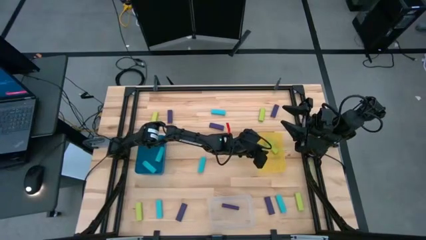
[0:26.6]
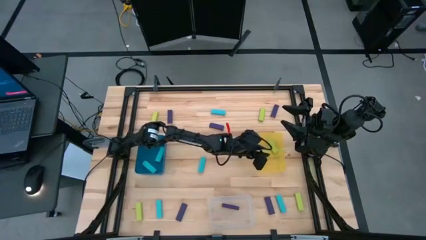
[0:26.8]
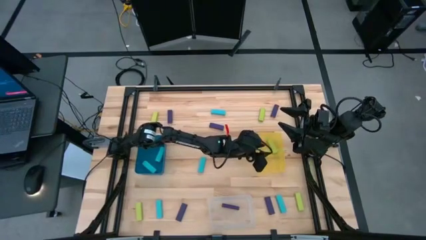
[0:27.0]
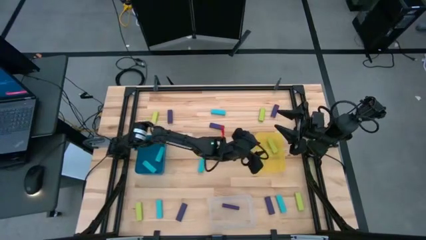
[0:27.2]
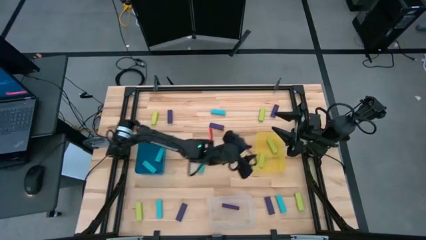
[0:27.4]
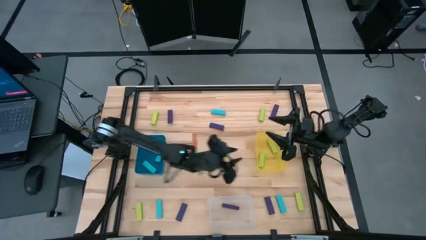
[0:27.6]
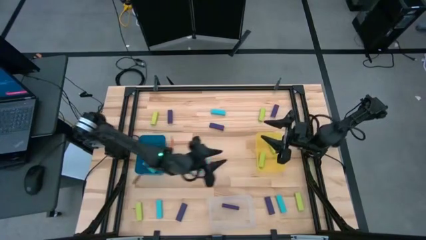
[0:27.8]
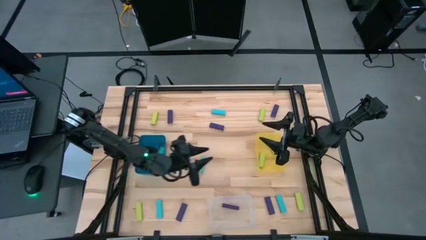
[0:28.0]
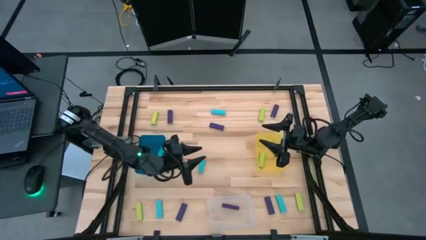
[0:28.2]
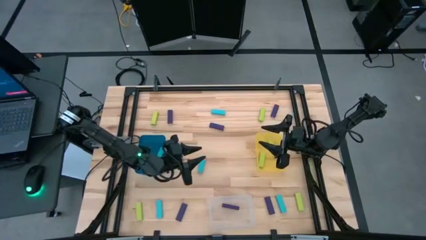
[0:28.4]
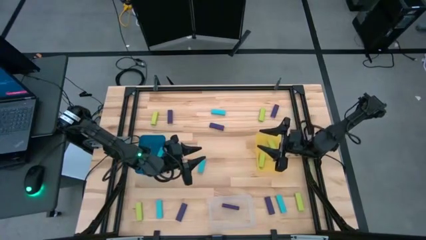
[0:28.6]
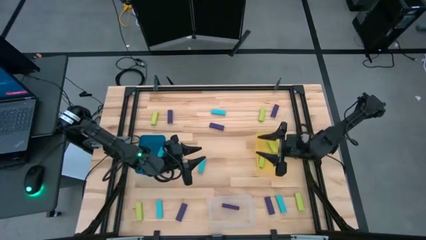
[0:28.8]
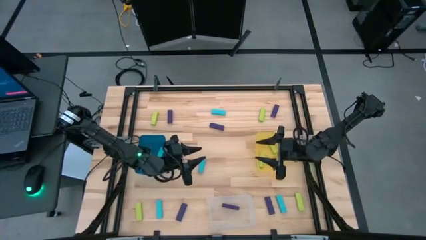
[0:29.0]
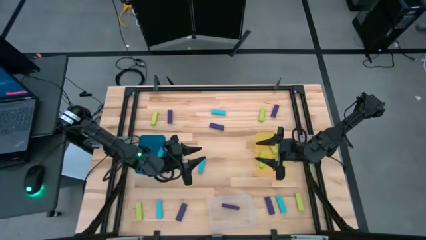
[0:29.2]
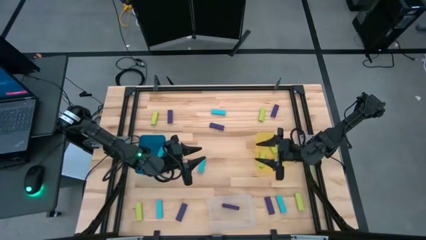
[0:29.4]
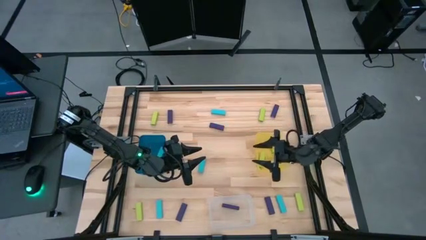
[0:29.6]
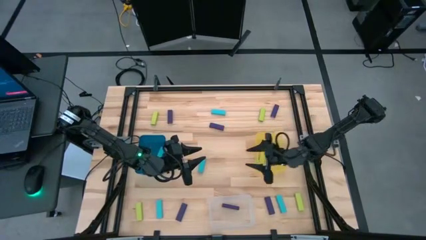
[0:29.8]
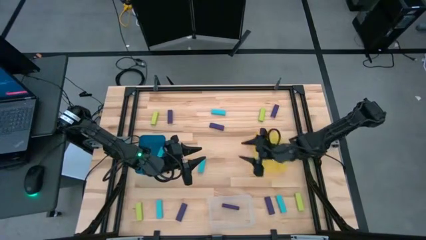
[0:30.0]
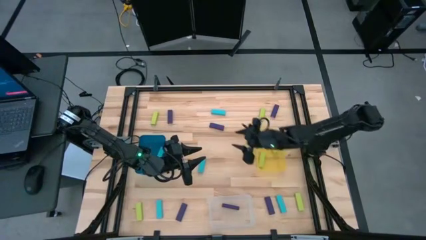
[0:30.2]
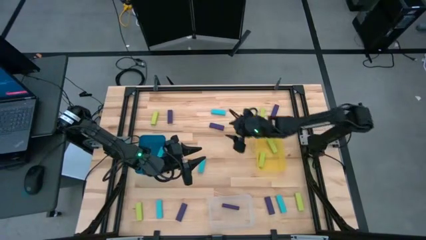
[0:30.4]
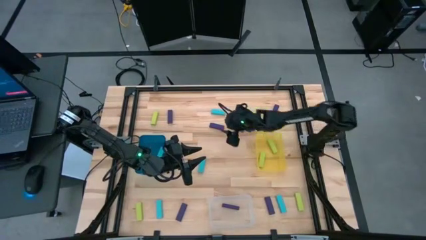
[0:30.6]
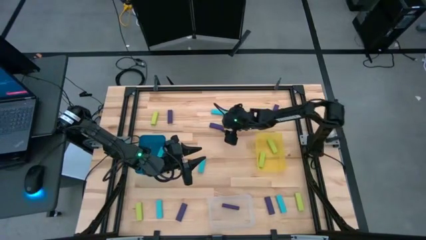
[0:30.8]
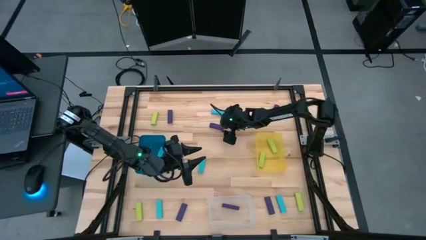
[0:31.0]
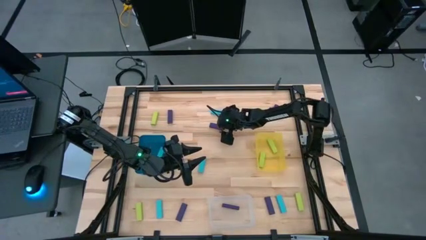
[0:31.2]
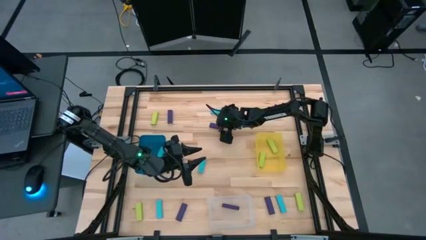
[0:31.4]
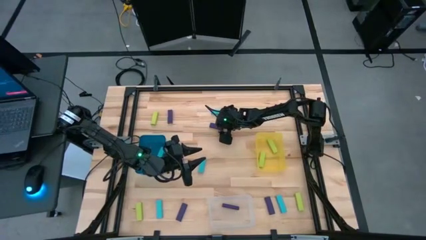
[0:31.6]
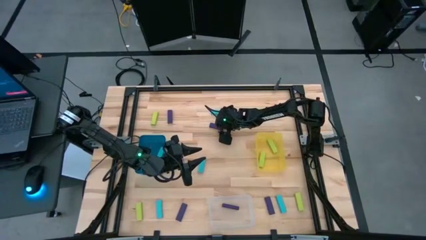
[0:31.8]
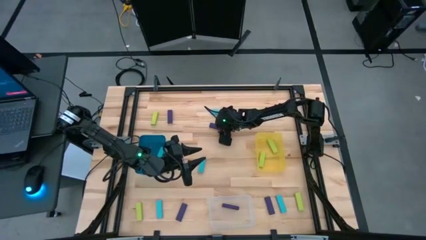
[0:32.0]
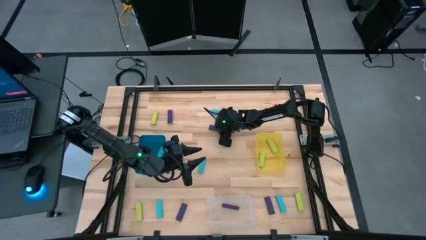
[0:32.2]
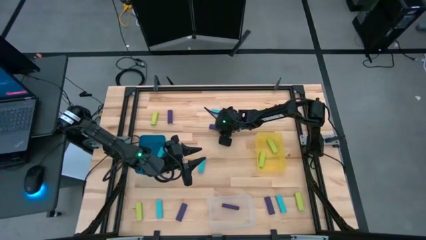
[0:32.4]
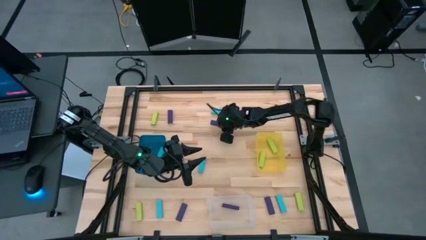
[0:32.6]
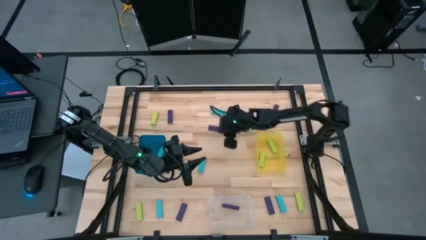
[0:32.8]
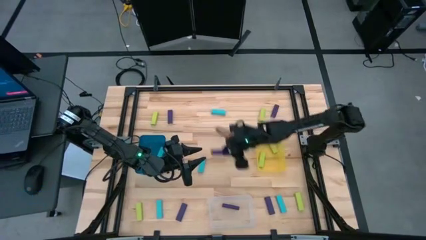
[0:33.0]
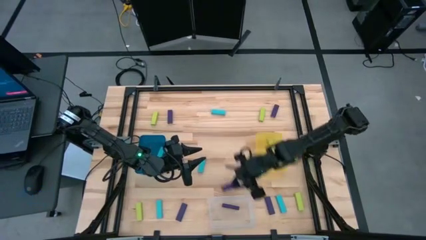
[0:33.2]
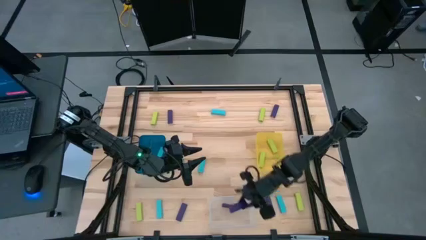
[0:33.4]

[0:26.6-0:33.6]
Task: Sort blocks
Put the violet block into the transparent bin

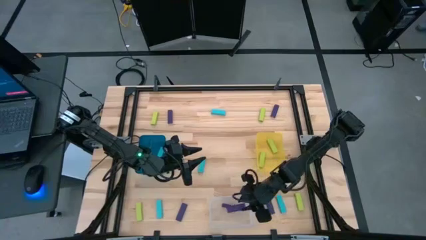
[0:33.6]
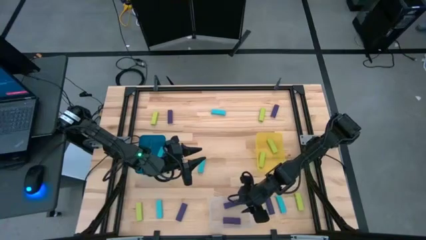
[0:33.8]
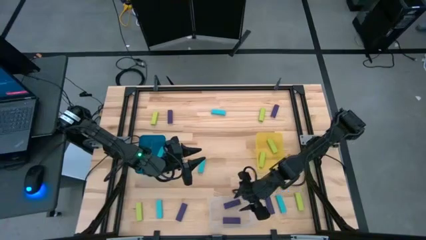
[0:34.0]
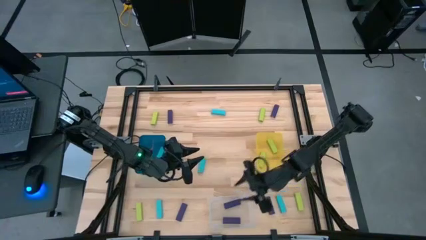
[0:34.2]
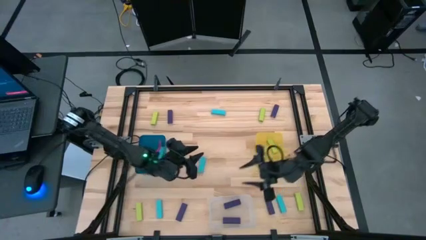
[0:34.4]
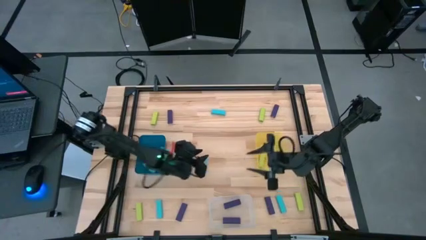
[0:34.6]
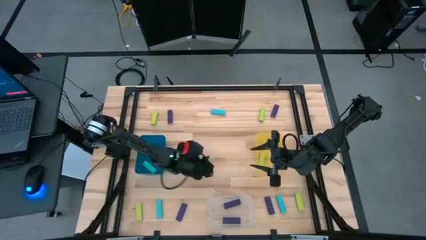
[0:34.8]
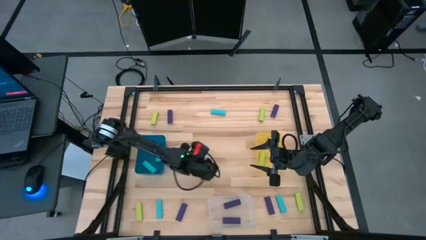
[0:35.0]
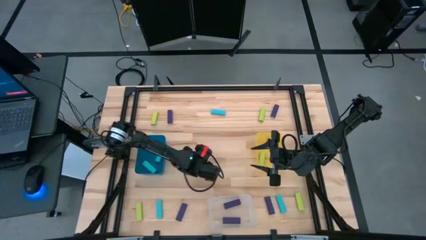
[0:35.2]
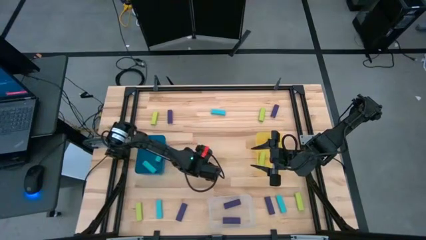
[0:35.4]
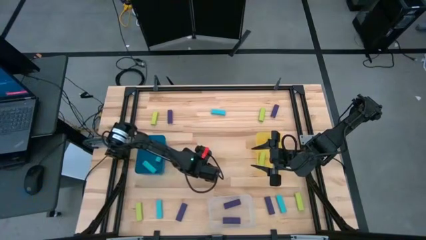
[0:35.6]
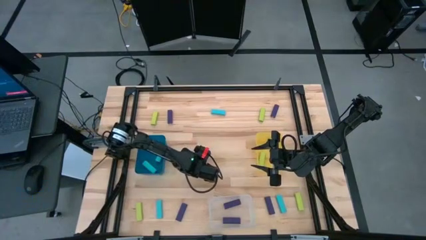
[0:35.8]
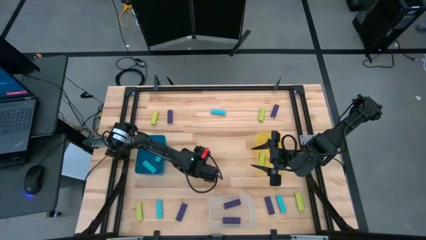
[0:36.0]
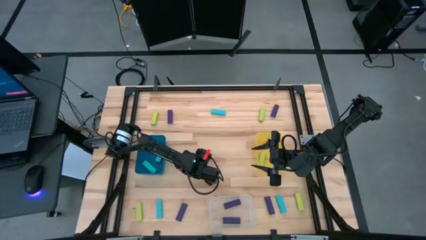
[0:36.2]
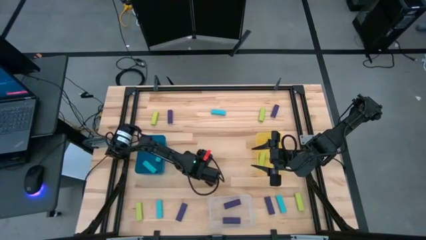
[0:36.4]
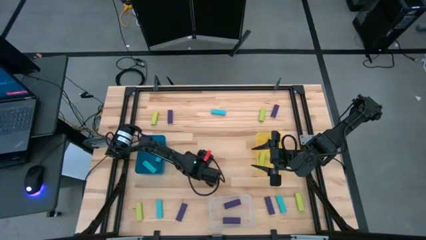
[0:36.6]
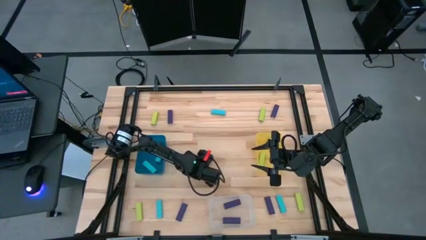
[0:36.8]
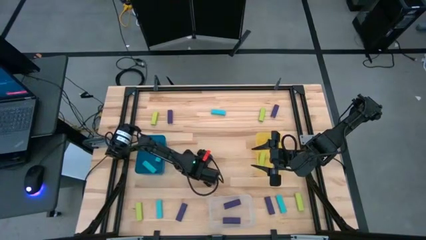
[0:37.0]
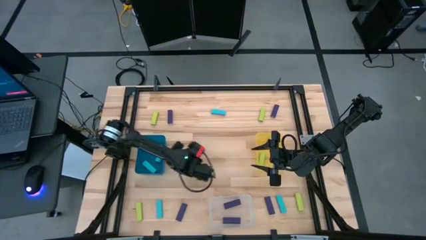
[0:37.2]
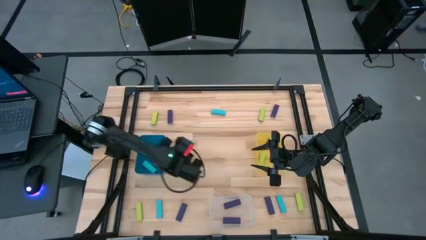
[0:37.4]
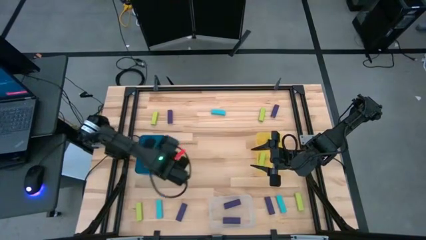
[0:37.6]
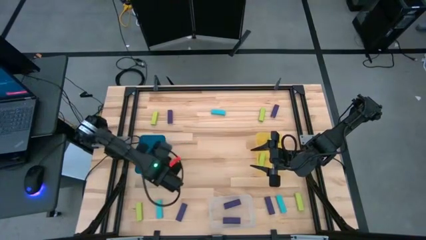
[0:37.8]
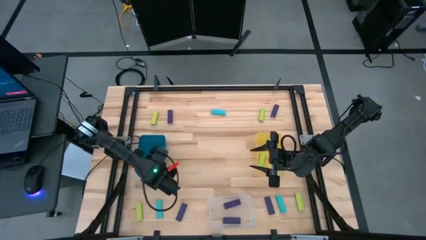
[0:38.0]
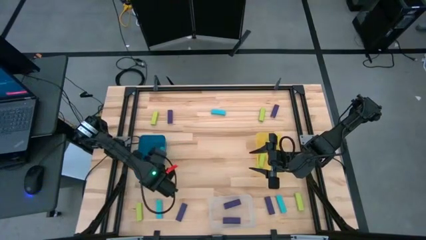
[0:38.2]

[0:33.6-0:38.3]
Put the light blue block into the blue bin

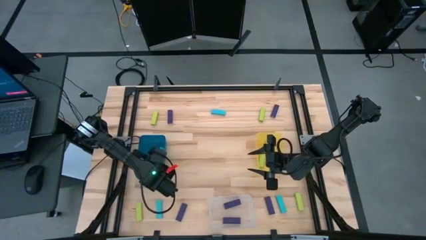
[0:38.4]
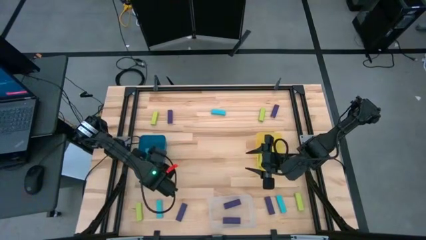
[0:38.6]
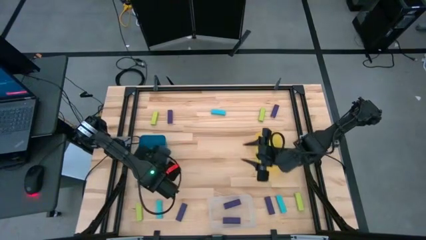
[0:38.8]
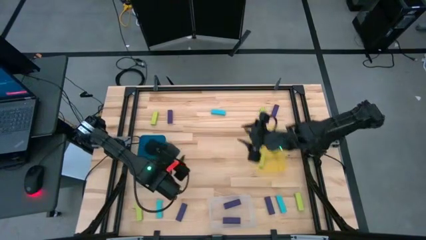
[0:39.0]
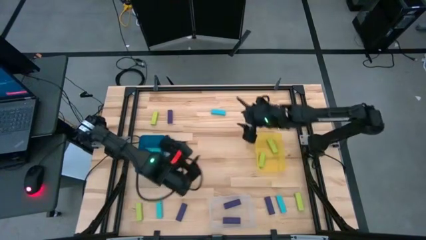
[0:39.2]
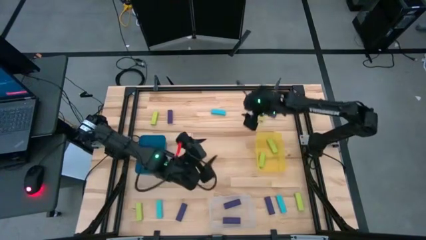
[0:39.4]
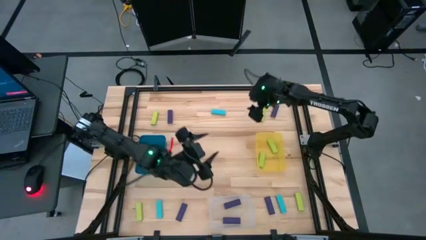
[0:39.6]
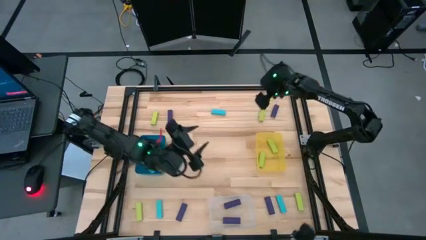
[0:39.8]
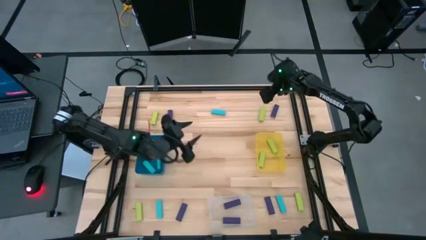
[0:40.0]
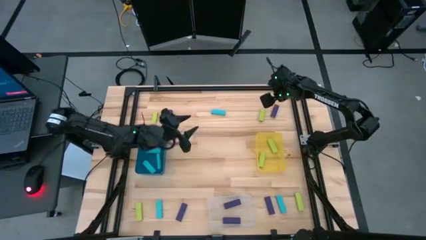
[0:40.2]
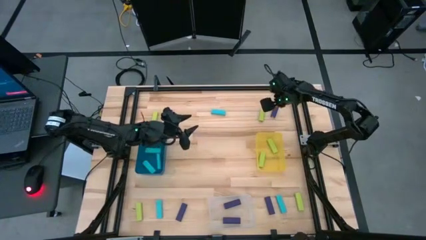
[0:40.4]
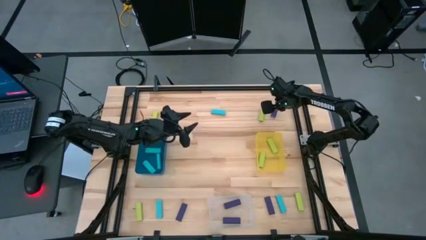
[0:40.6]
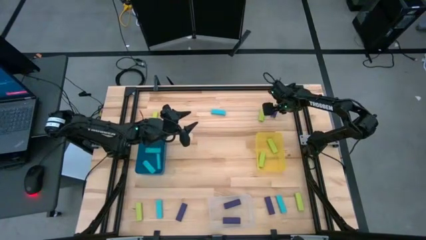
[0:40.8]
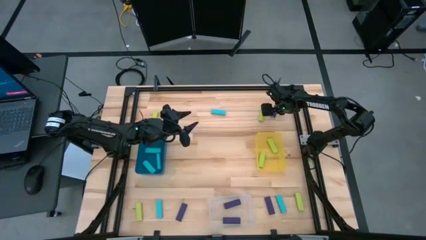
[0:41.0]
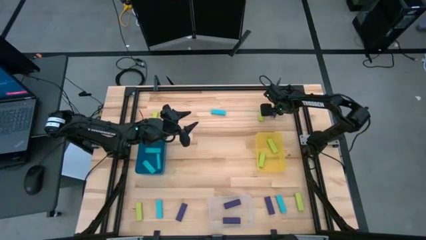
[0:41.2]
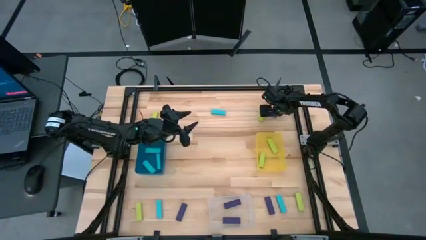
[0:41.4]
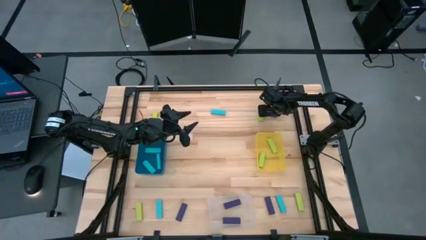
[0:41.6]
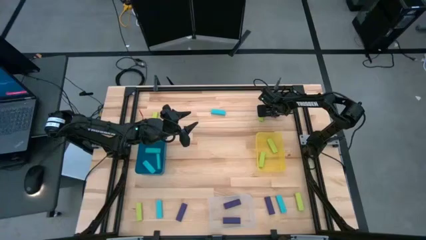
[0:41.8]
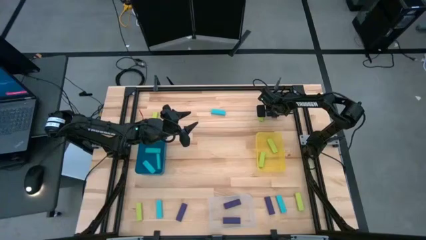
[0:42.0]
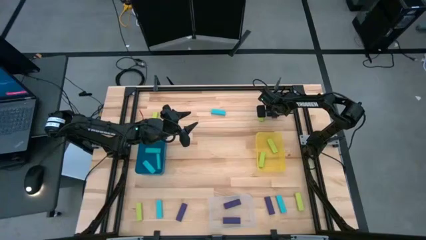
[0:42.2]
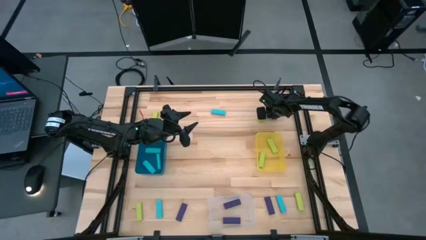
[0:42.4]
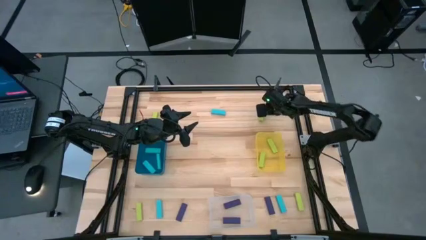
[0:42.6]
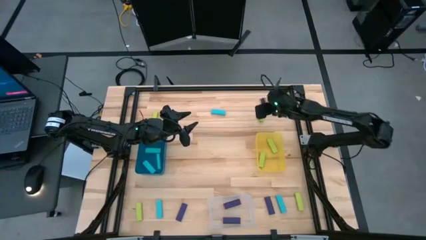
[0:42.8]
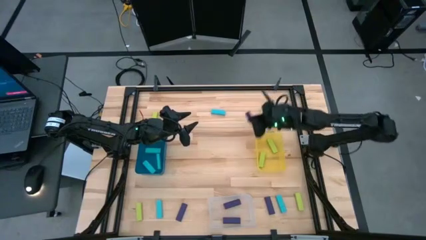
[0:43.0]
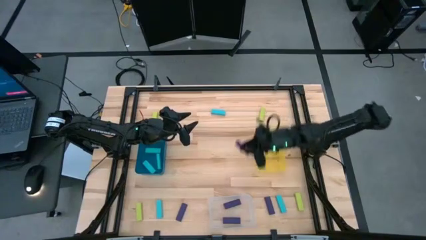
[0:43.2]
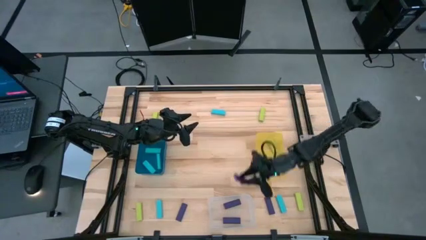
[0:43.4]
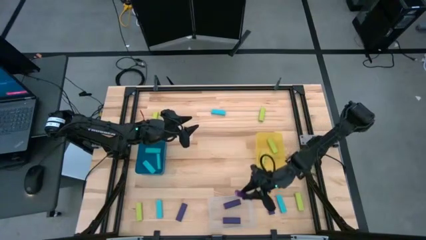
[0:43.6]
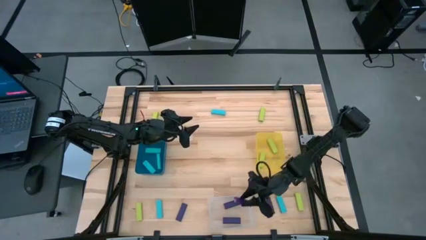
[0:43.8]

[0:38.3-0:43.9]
Put the violet block into the transparent bin
